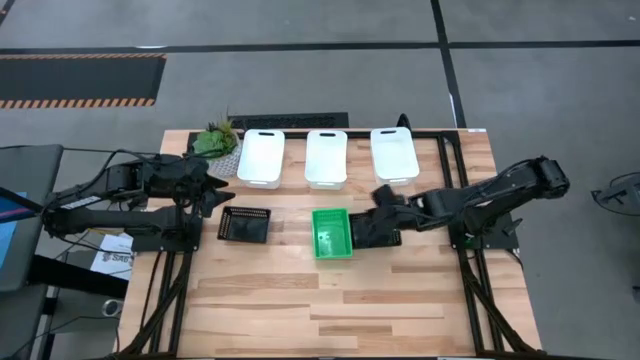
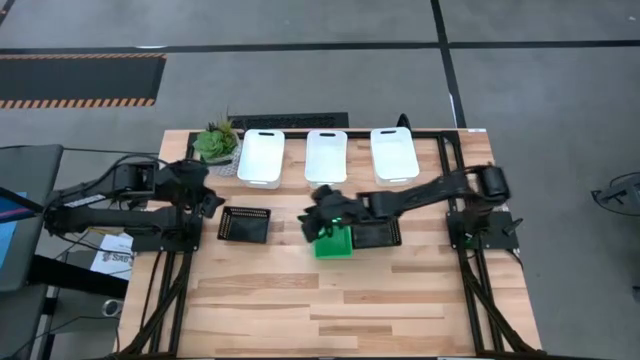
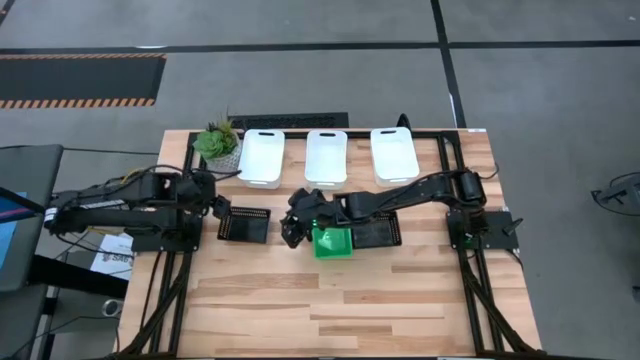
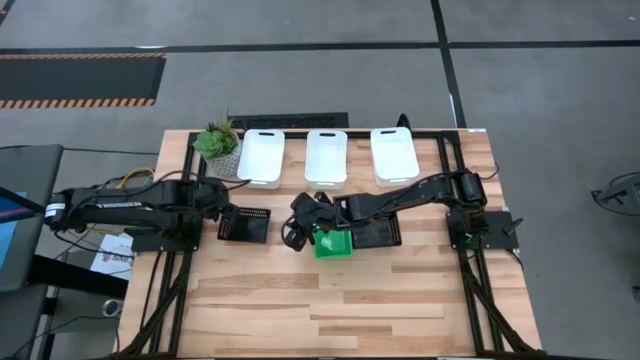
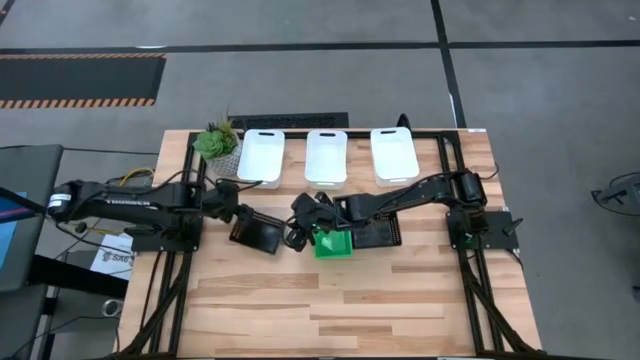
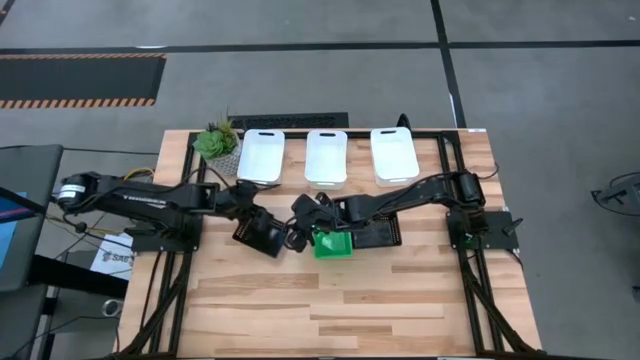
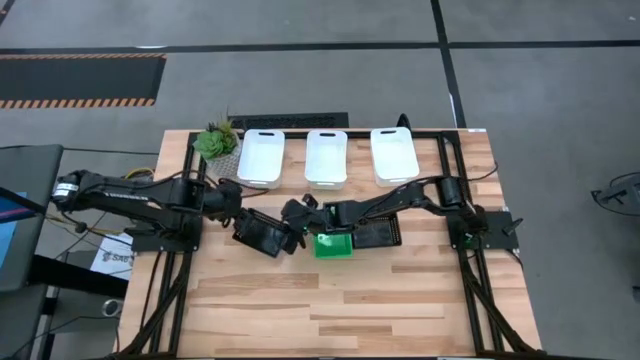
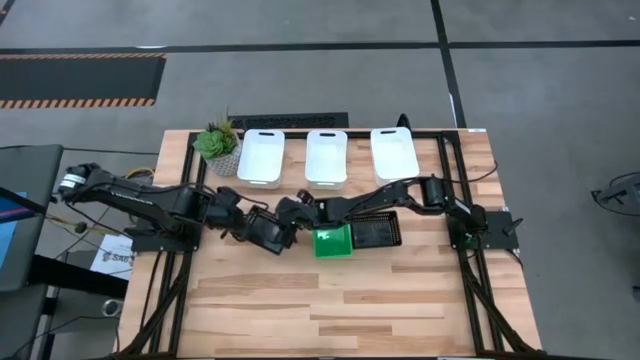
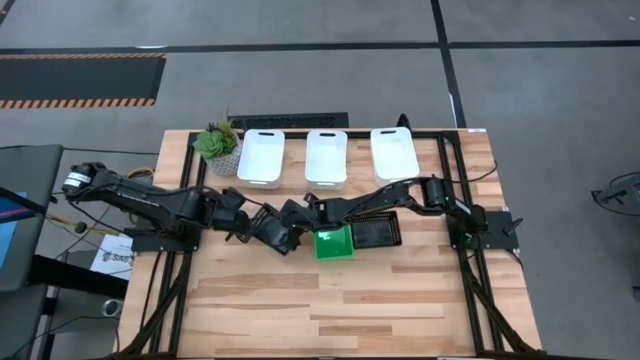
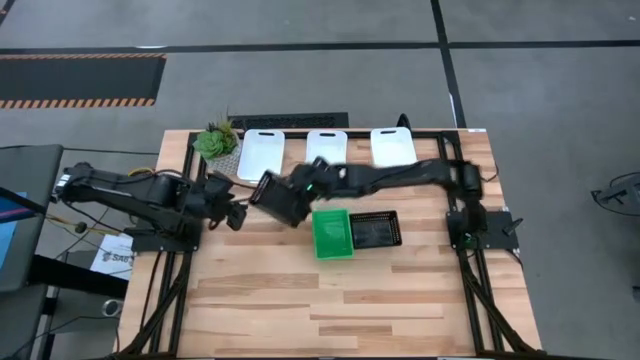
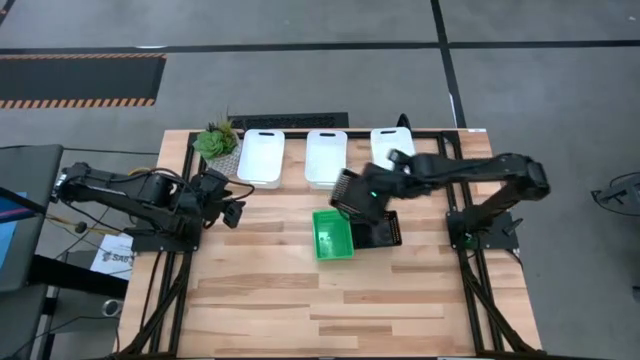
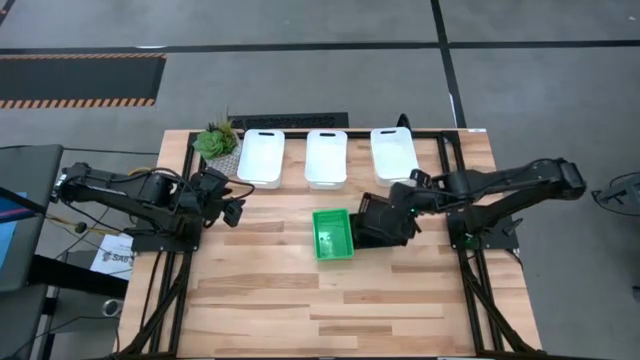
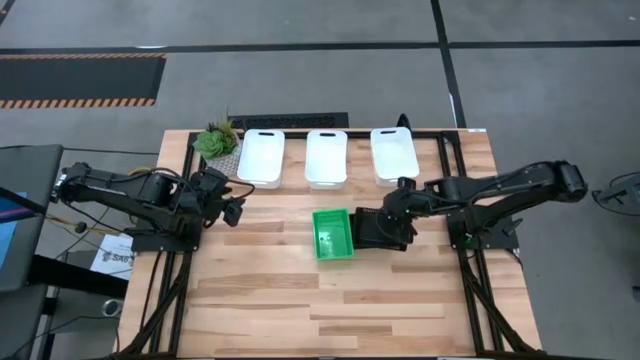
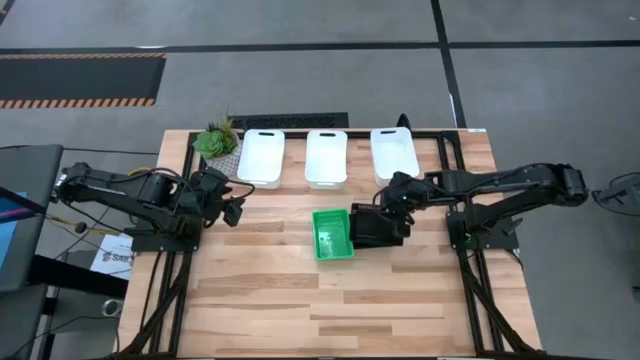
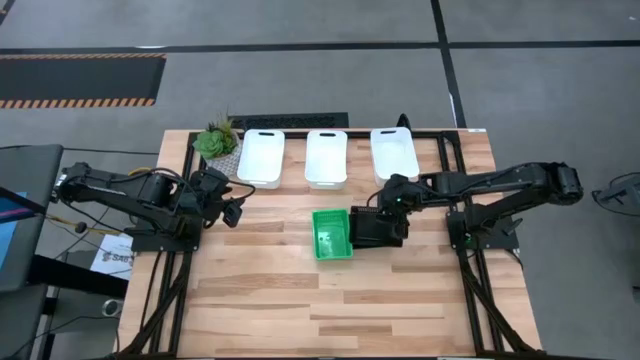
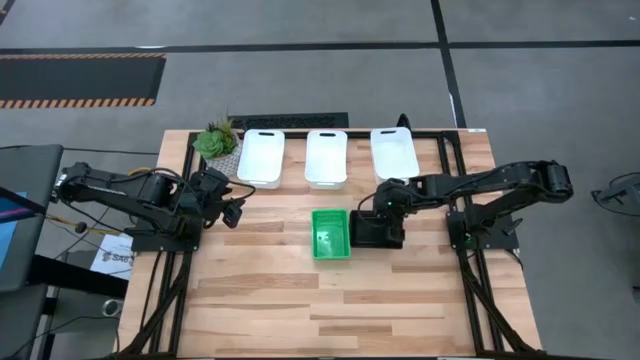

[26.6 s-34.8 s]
Stack the left black bin on top of the right black bins

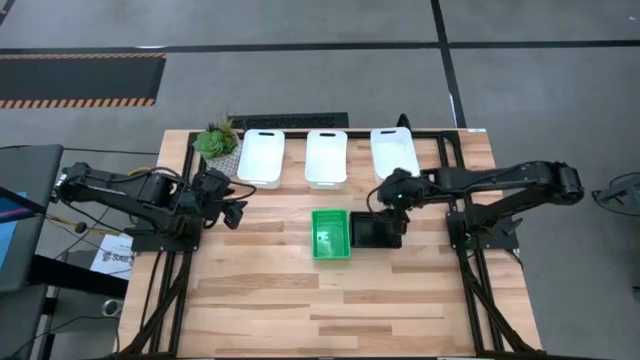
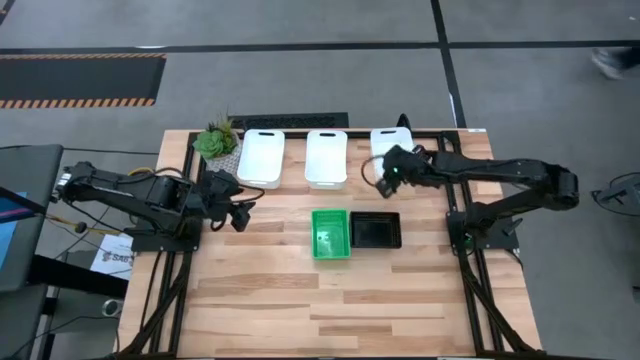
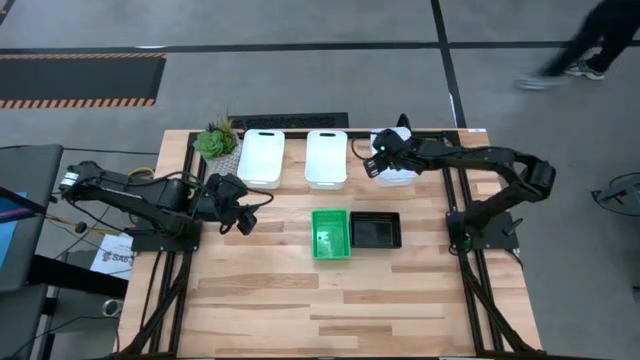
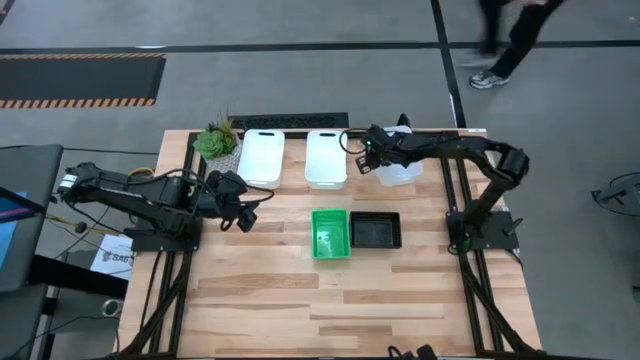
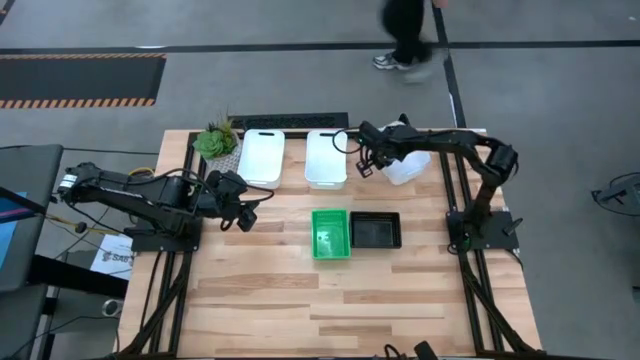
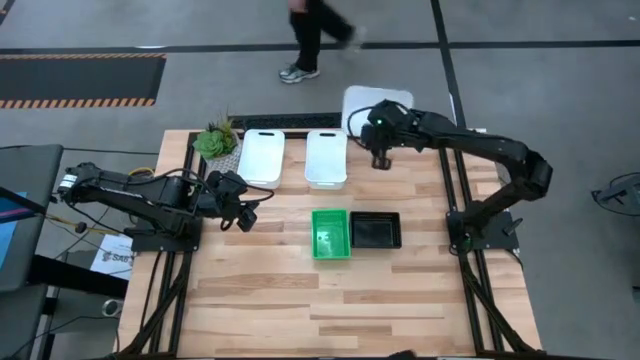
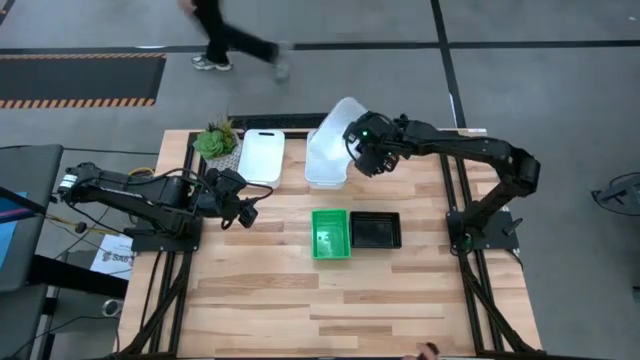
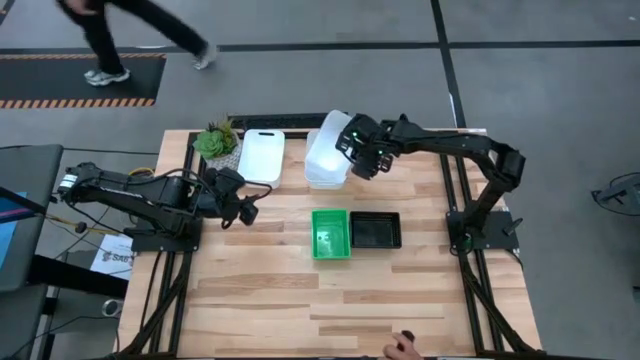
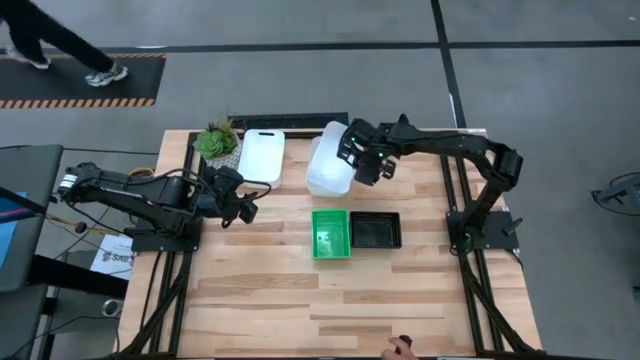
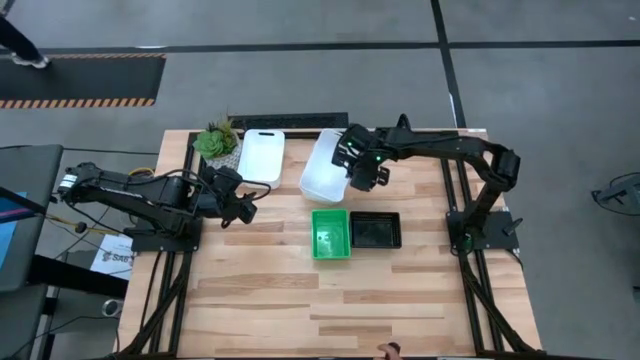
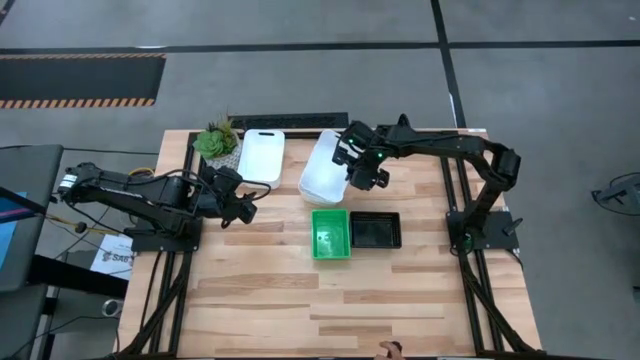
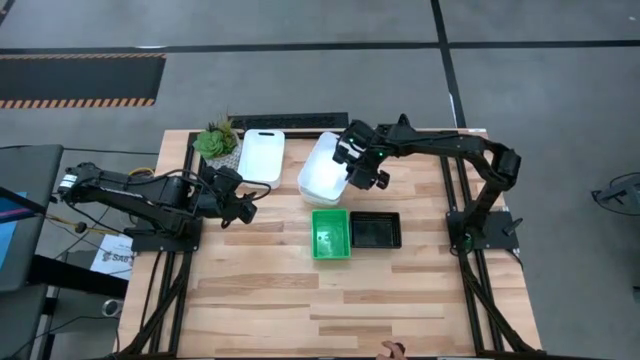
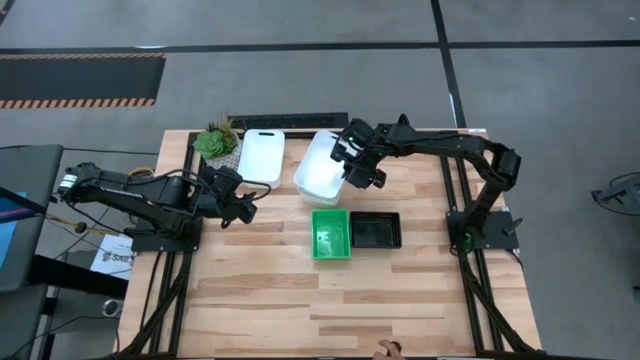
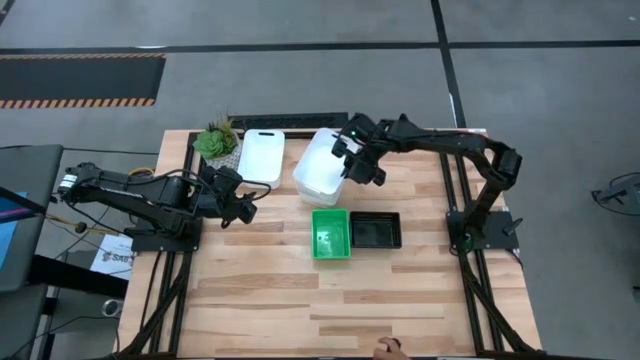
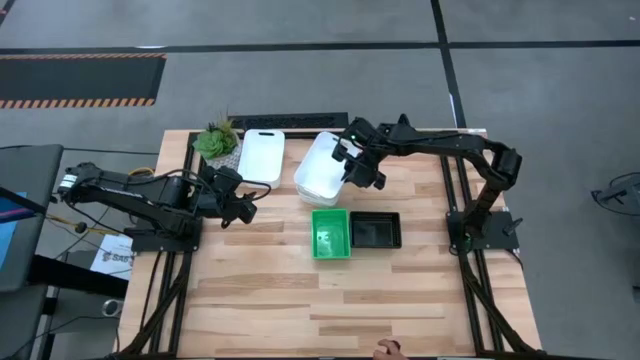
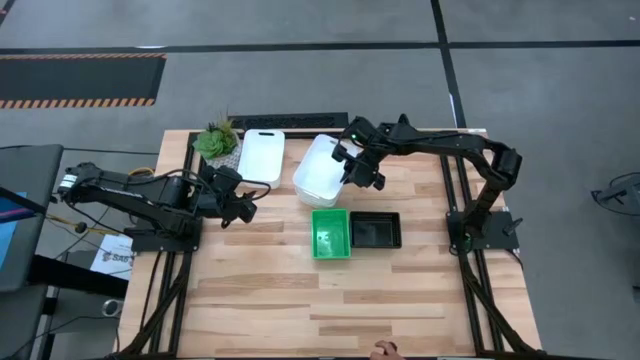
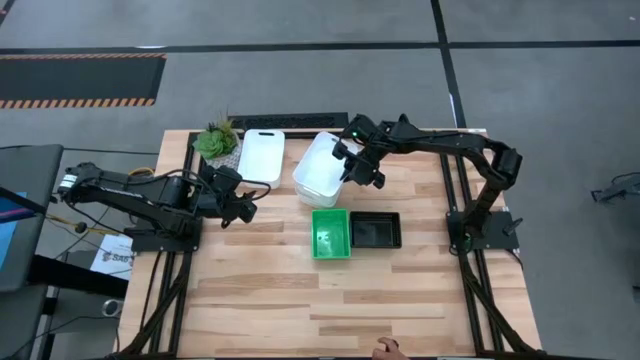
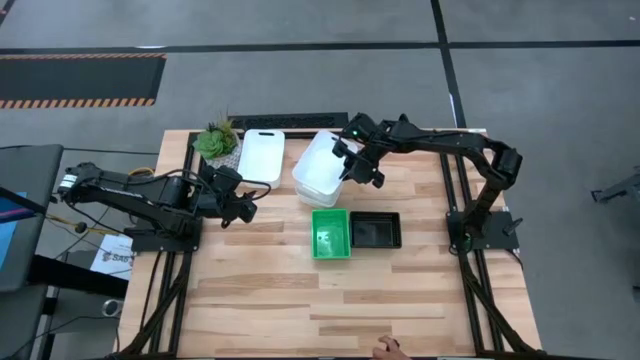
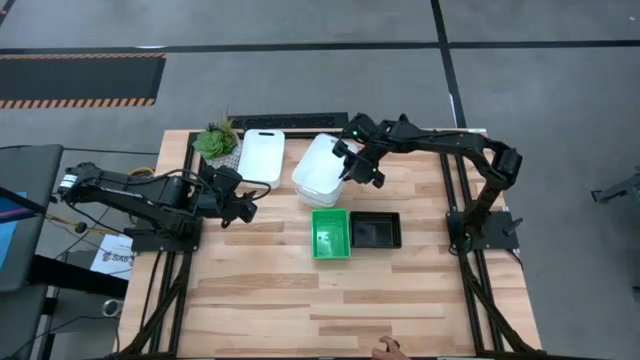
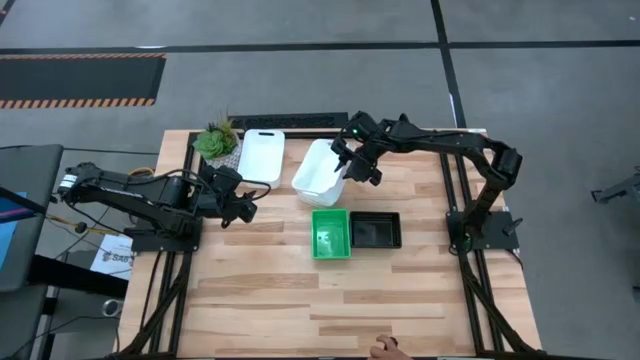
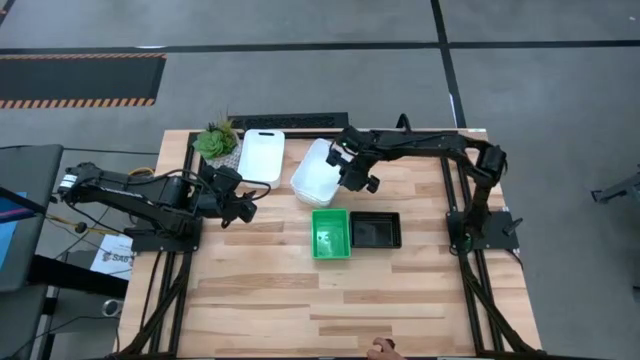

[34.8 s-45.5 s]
Stack the right white bin on top of the middle white bin
